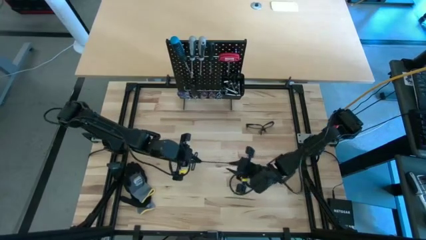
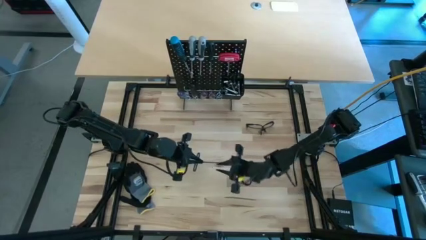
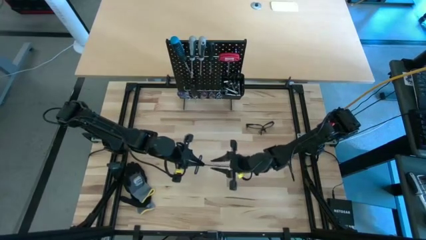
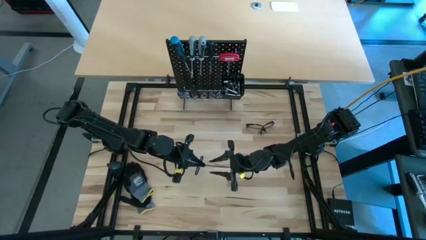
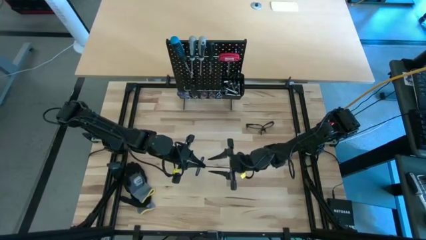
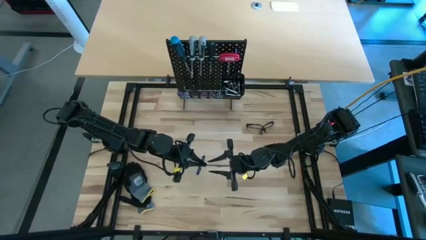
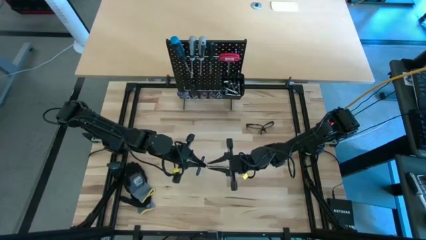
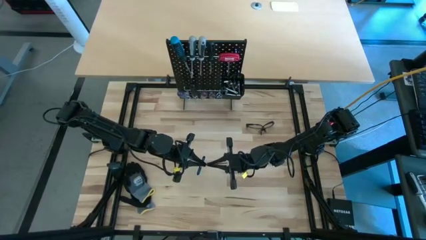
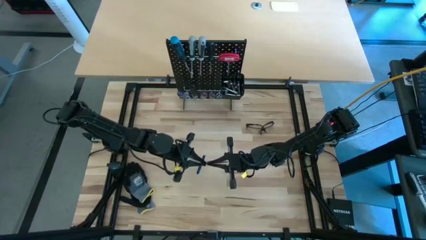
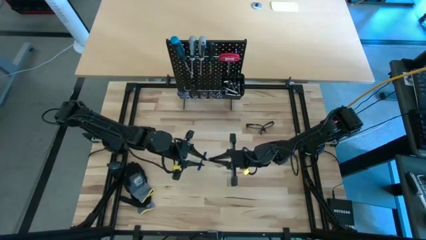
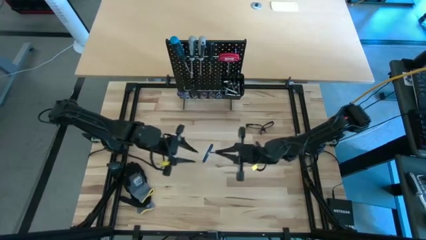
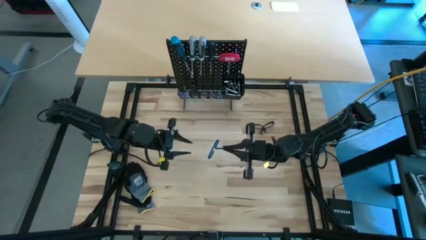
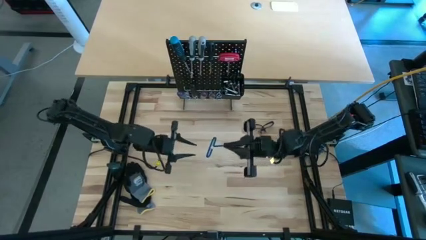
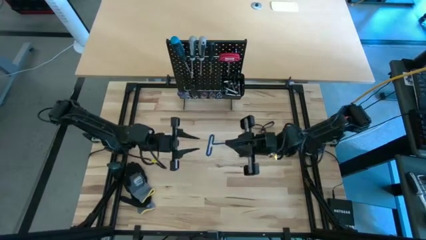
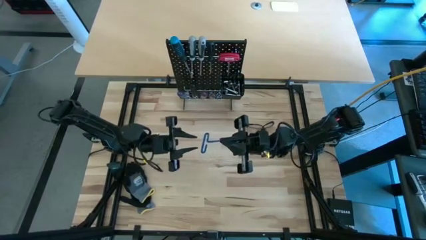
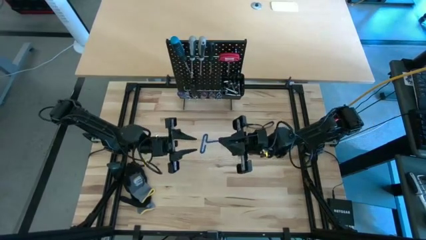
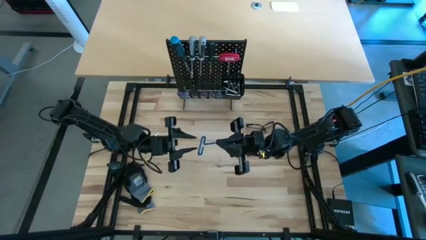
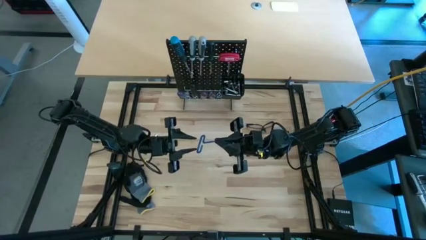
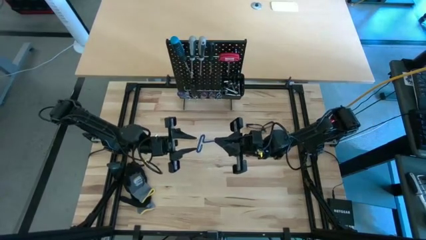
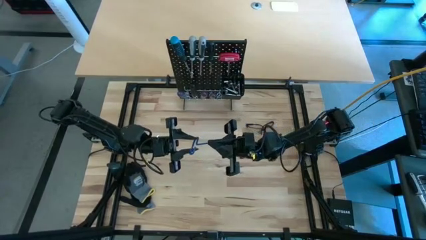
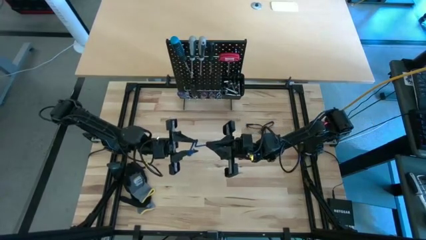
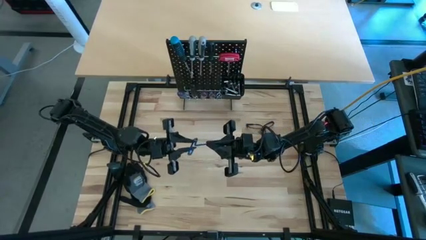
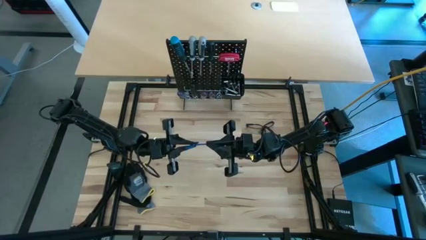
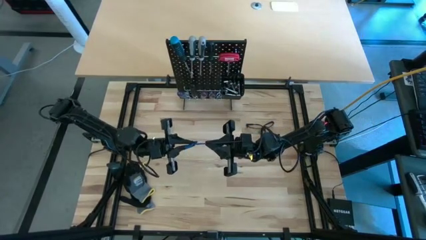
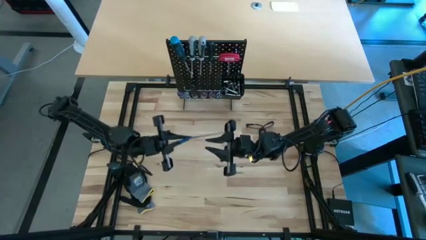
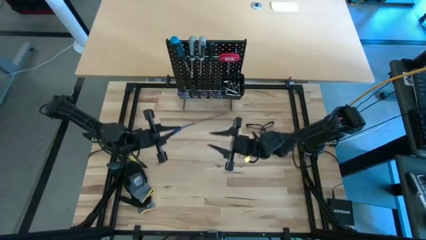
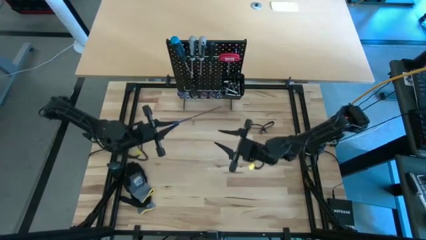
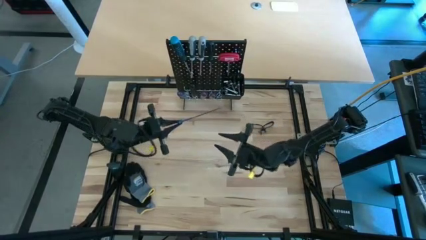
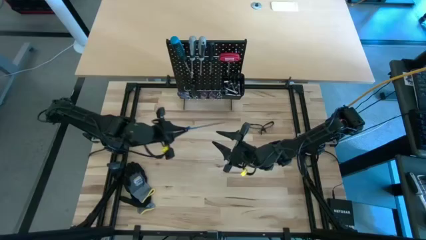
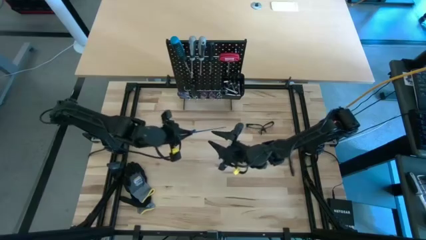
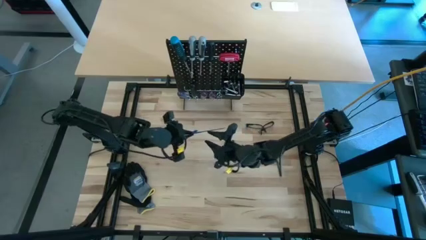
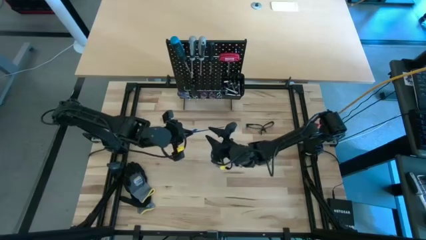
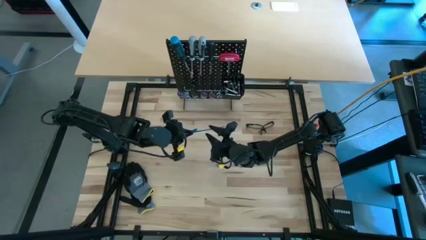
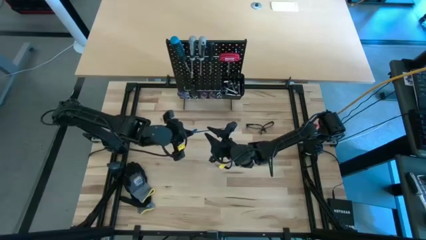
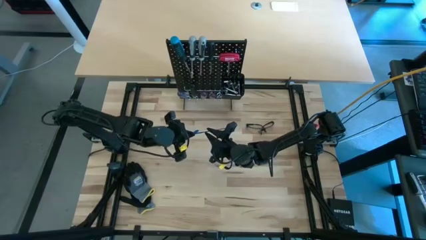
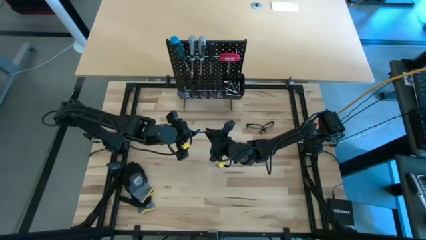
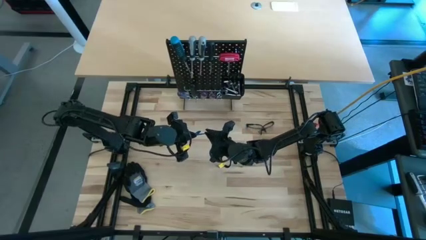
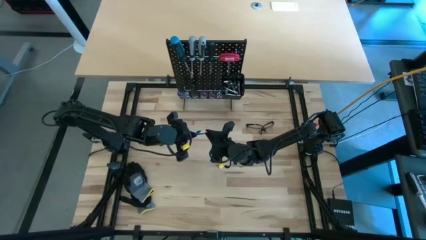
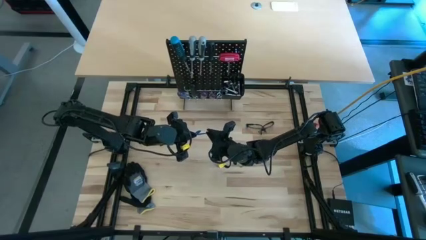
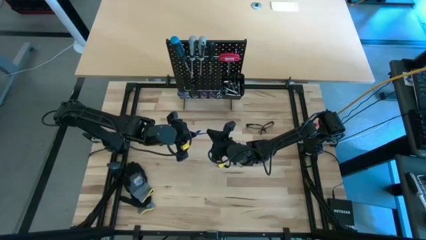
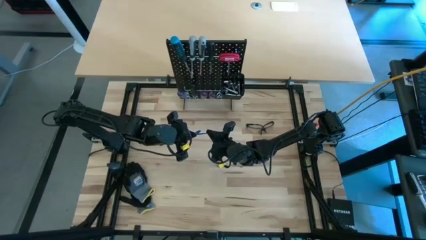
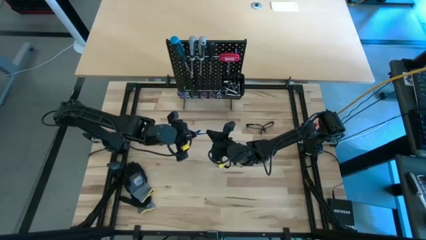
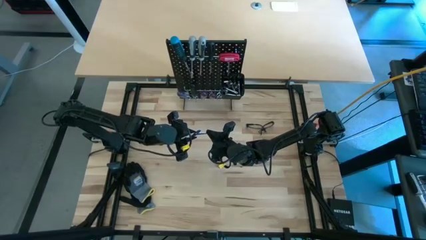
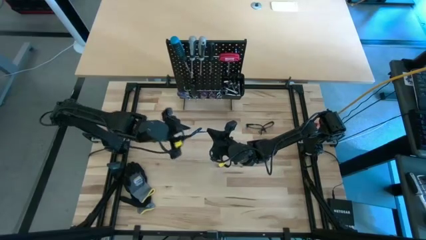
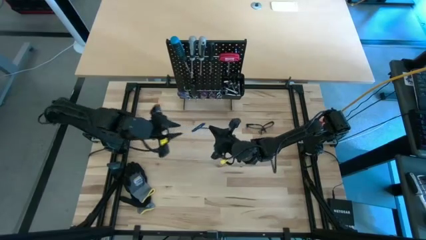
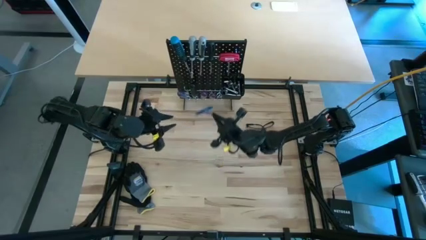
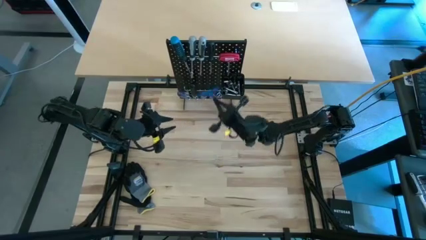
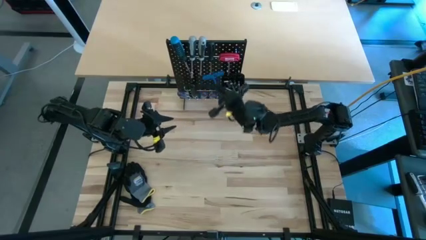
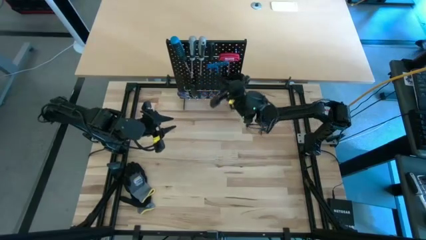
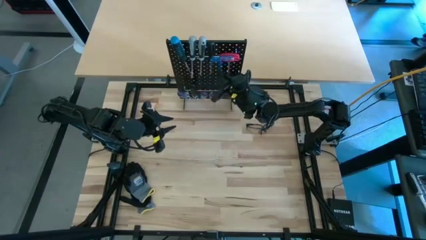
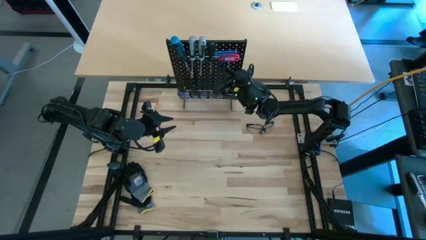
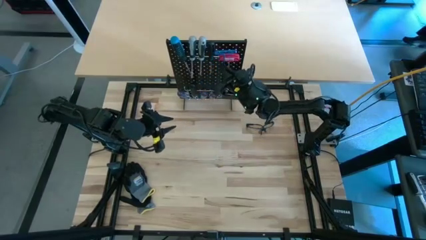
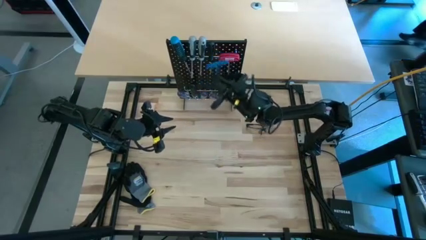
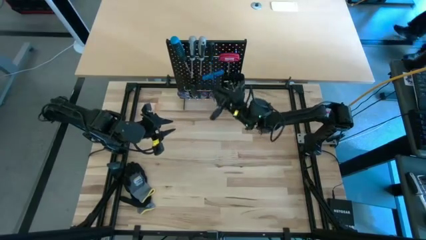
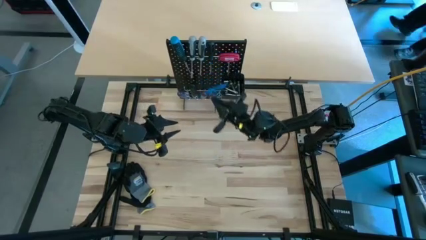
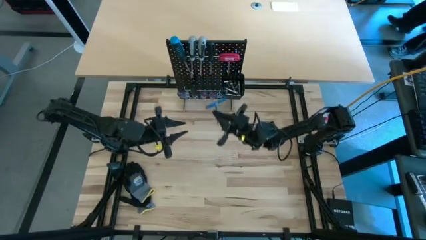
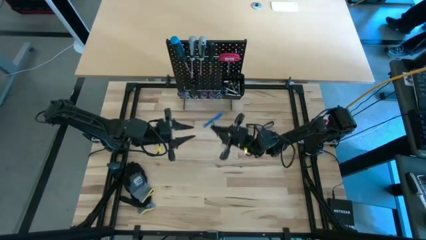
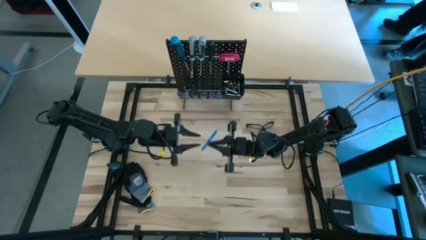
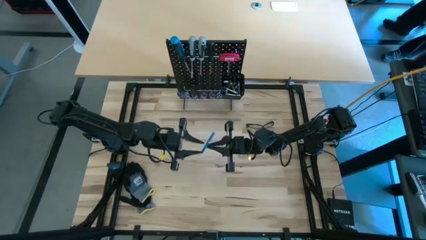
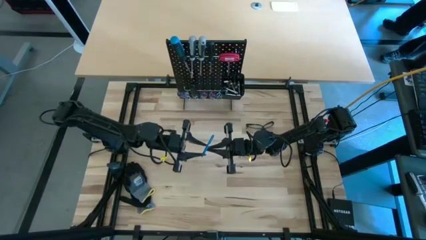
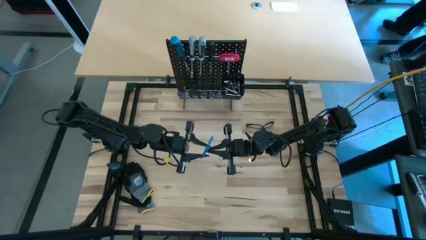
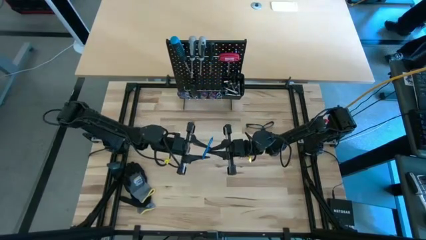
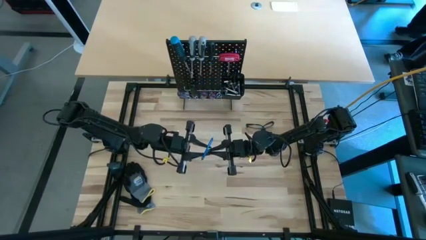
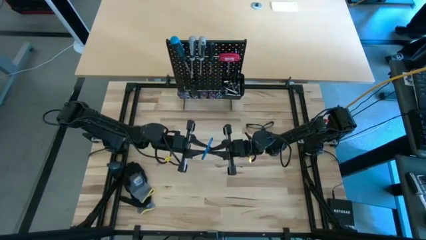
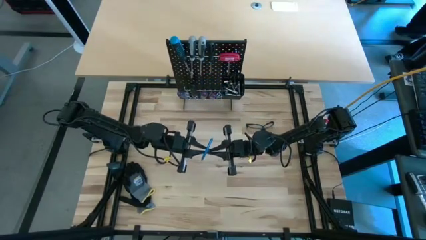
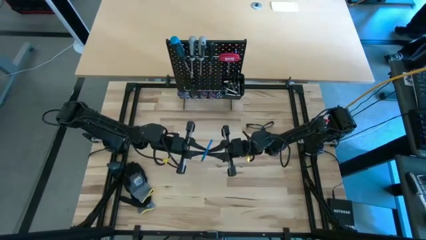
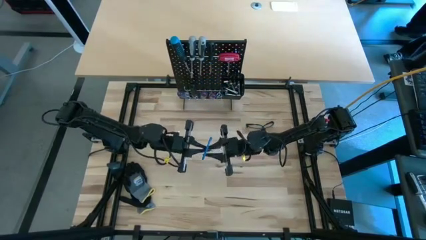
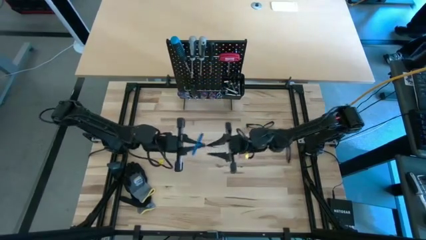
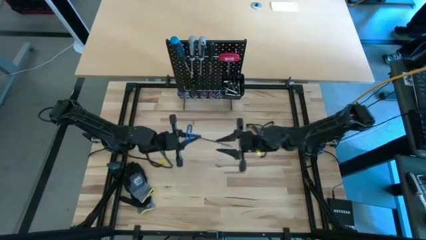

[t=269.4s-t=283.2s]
Task: Hang tools onto peg board
Hang the blue pick tool on the peg board
